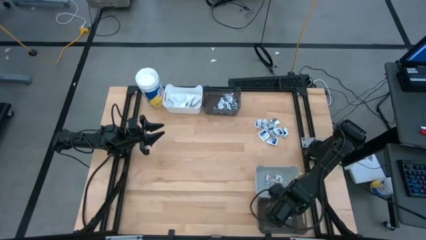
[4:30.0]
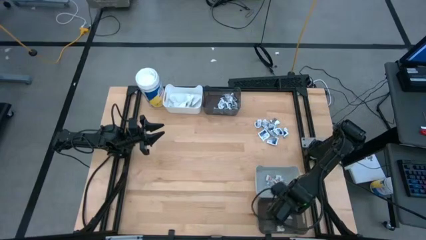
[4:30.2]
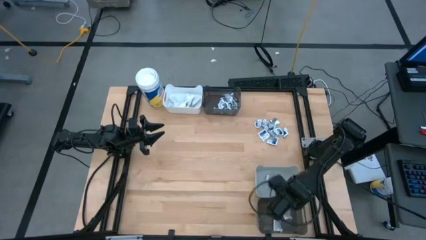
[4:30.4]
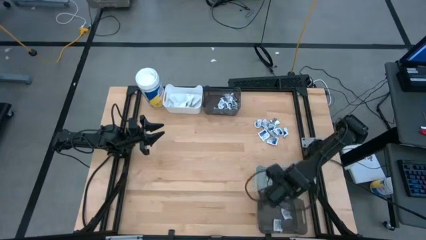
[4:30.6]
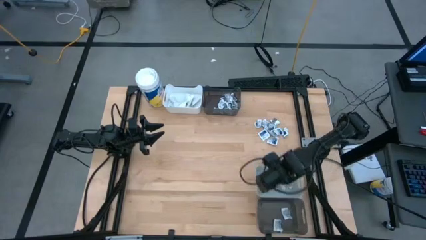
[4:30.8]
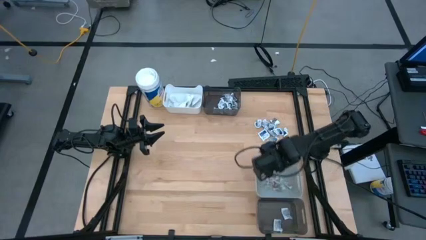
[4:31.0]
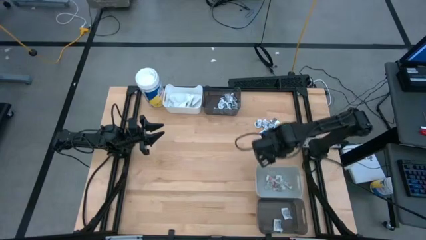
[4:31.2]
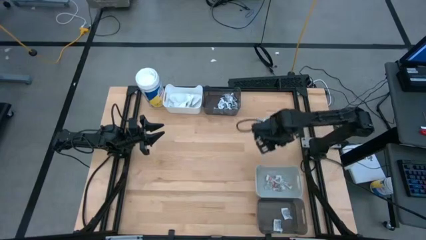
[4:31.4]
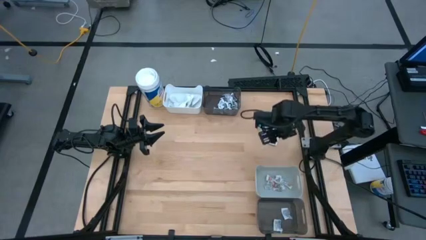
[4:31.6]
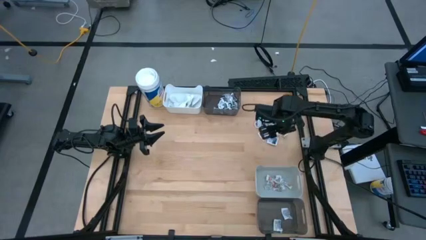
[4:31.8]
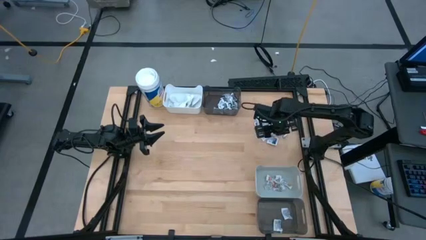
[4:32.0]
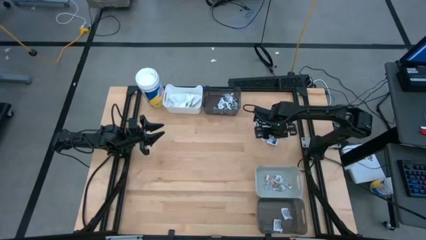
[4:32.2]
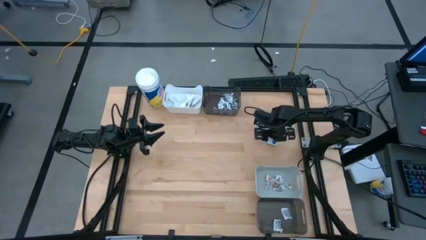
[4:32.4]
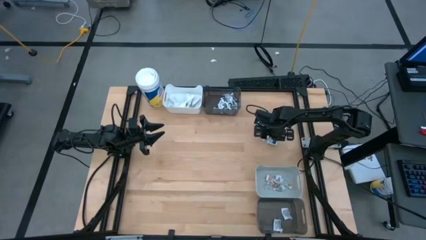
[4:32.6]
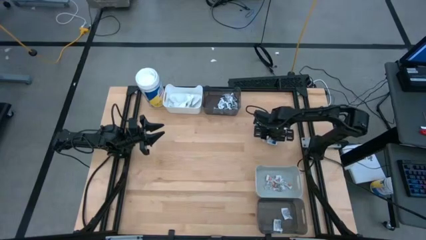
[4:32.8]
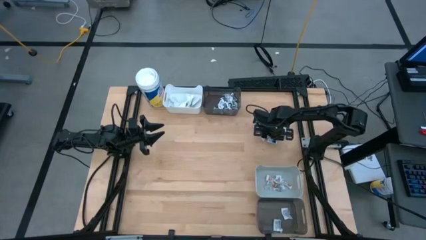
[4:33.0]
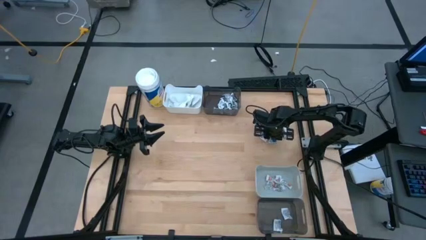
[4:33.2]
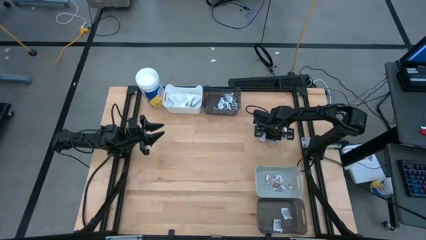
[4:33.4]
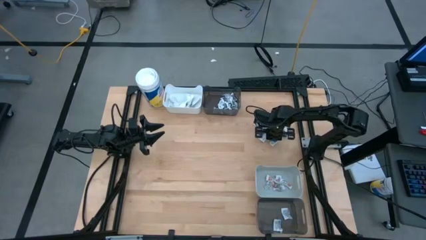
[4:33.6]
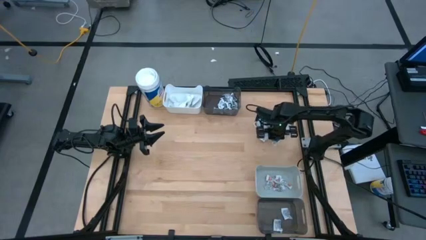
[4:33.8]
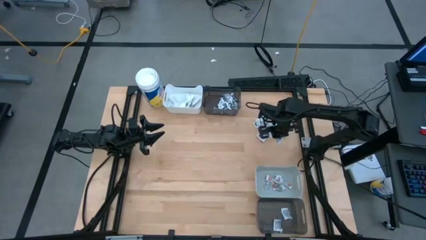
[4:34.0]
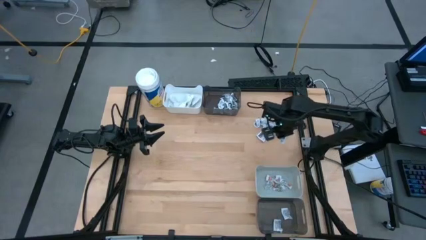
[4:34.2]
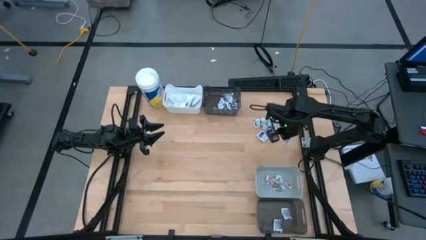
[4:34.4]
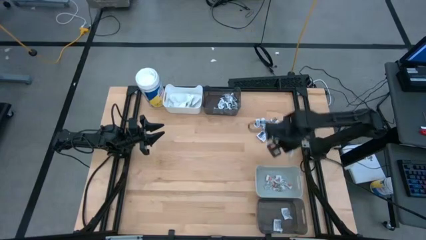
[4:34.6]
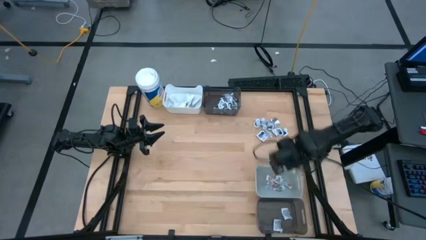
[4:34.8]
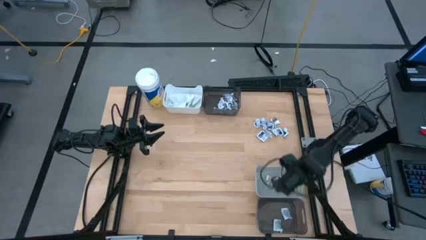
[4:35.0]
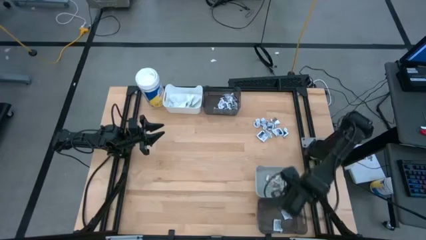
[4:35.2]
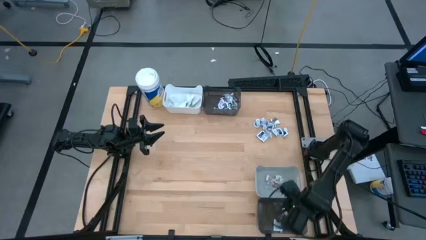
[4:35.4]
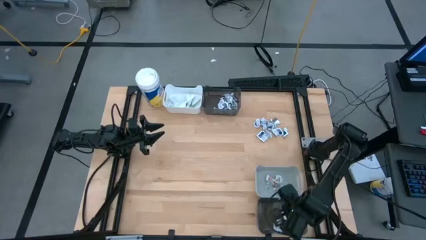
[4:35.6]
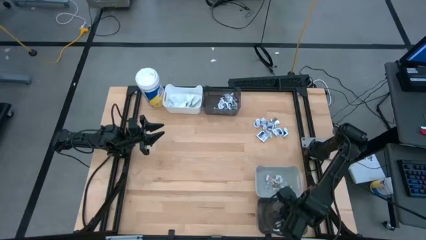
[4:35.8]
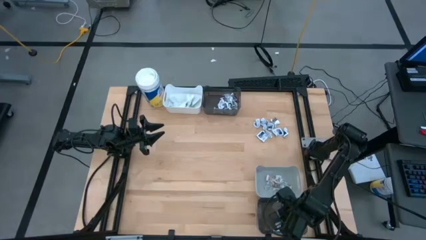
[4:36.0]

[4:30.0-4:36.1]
Task: Pick & Place First Aid Supplies
Put the blue alcohol pad into the bottom black bin

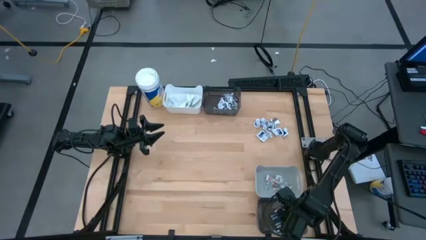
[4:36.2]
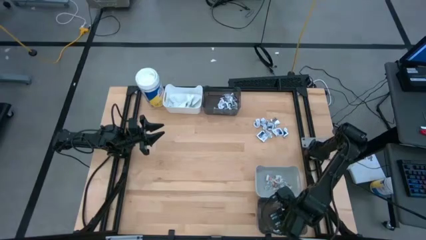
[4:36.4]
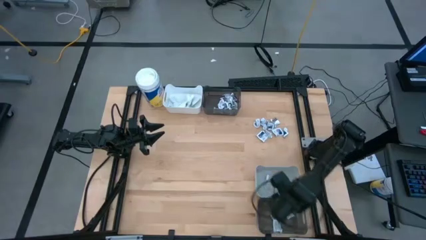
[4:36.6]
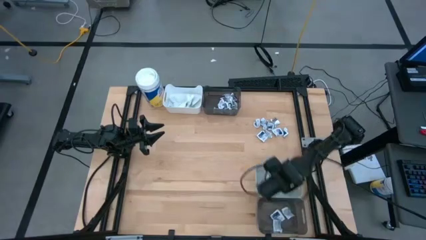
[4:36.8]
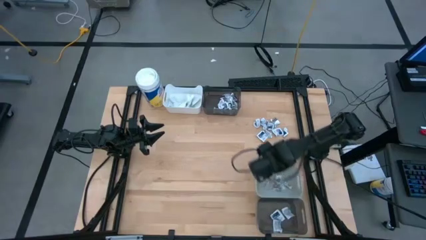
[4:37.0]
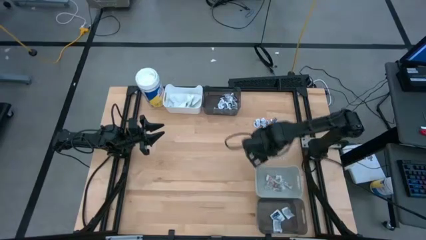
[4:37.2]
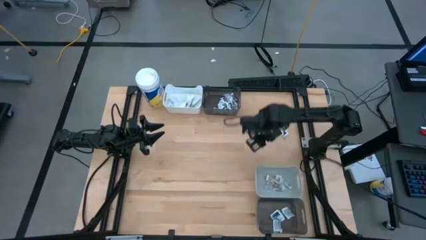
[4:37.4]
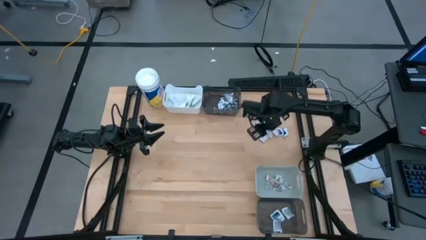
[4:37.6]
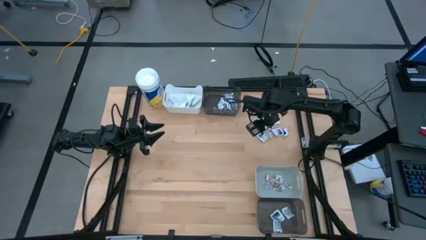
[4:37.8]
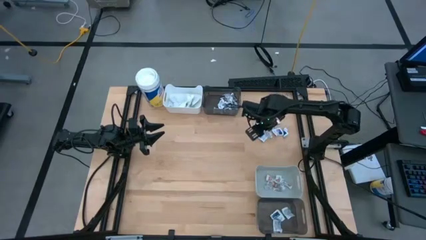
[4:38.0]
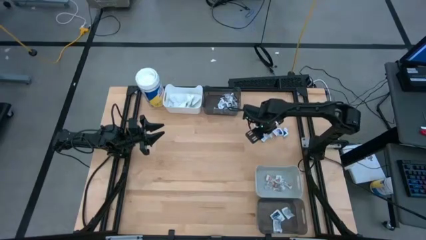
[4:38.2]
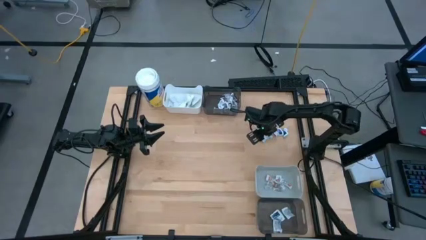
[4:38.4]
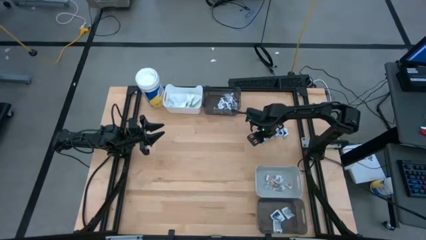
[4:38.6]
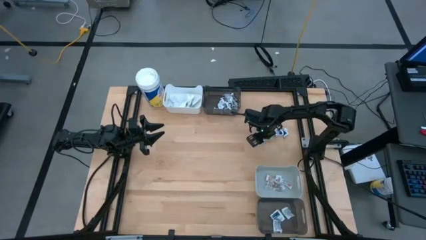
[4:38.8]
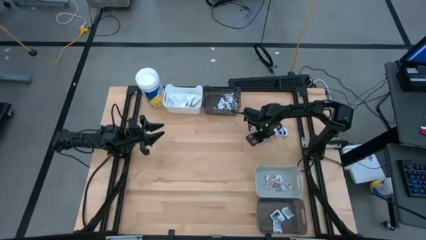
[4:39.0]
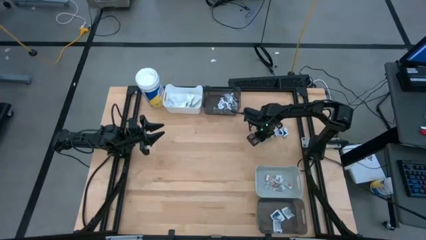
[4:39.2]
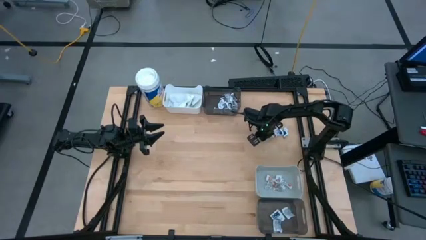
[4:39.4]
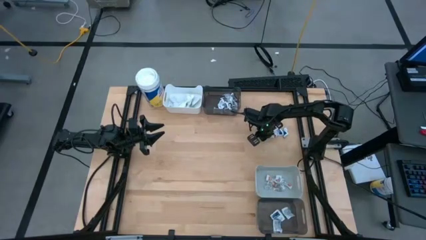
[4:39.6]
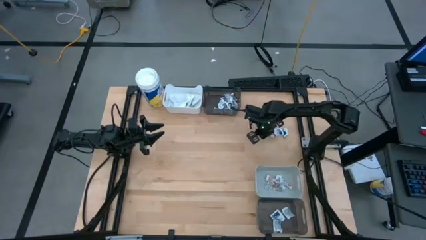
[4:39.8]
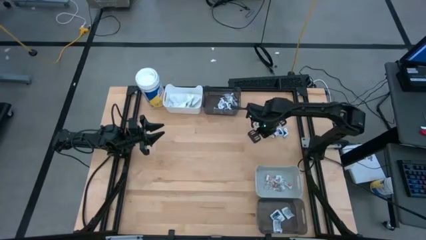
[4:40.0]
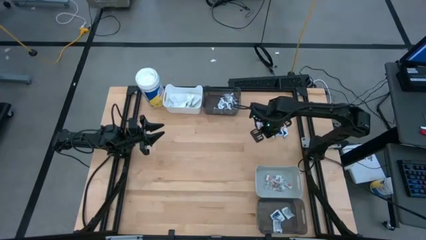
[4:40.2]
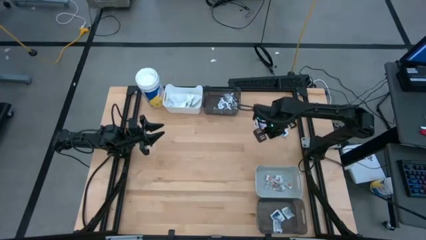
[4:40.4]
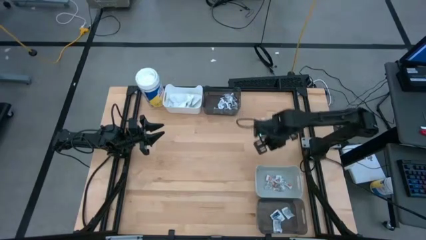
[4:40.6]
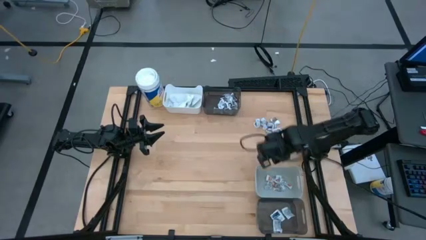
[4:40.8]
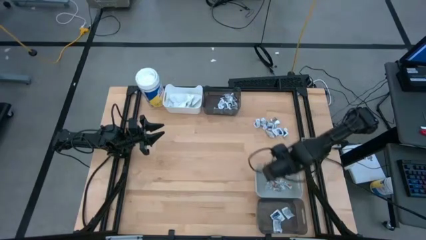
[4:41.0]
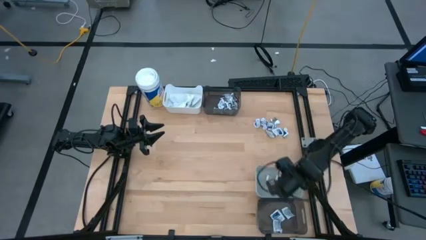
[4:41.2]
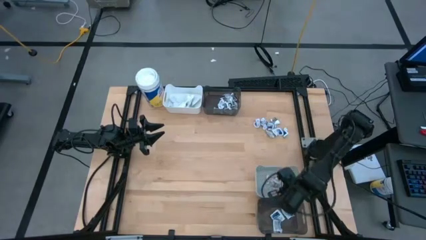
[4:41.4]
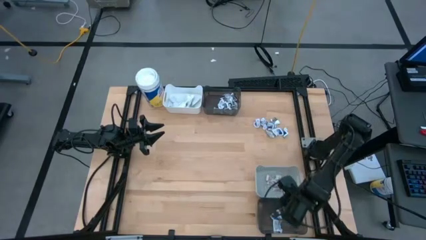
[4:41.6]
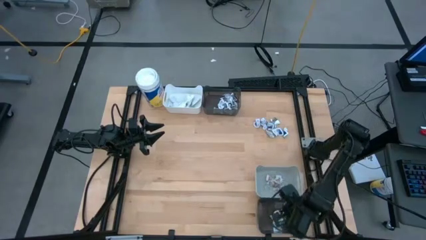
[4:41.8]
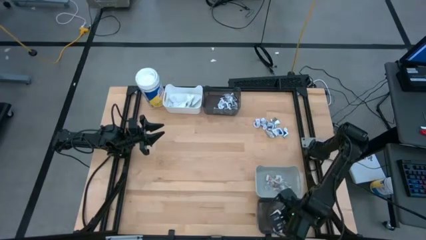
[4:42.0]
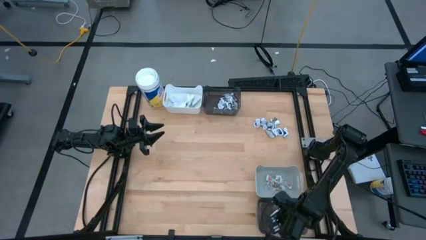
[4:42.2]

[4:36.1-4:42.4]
Put the blue alcohol pad into the bottom black bin

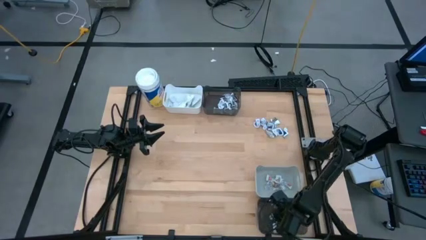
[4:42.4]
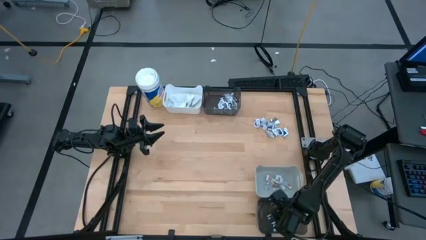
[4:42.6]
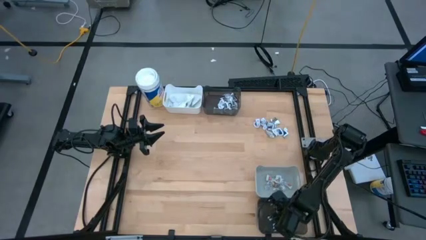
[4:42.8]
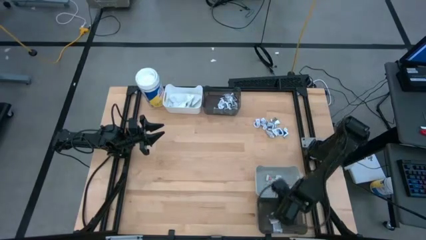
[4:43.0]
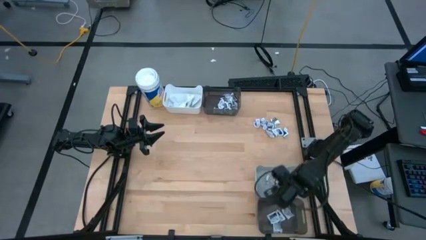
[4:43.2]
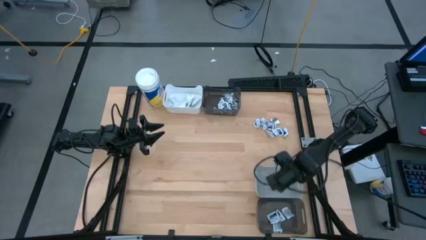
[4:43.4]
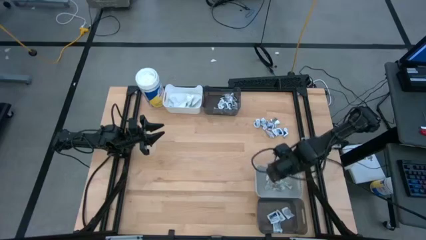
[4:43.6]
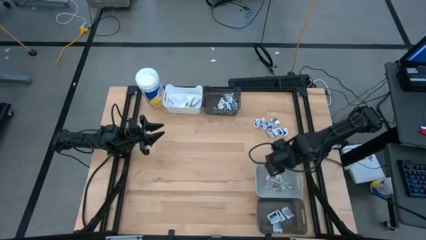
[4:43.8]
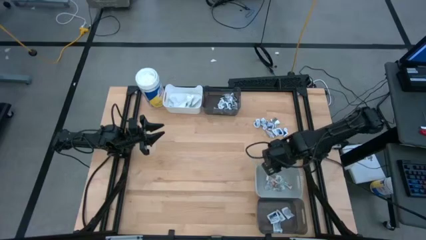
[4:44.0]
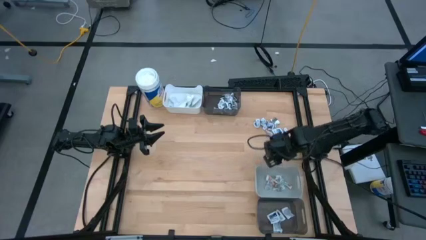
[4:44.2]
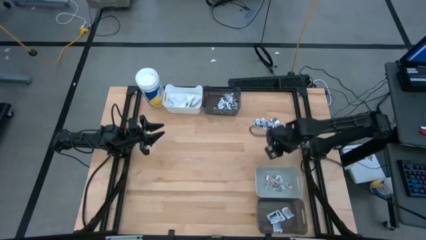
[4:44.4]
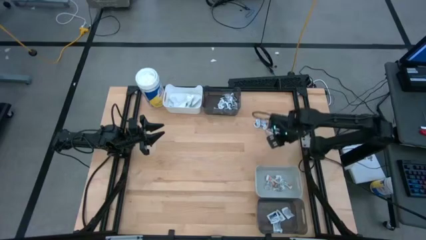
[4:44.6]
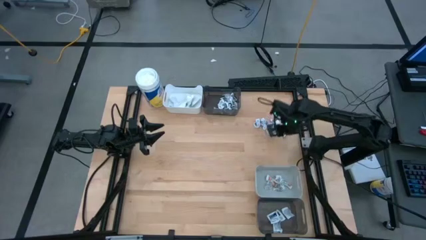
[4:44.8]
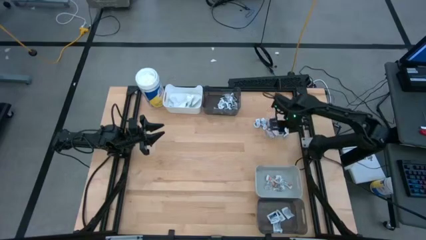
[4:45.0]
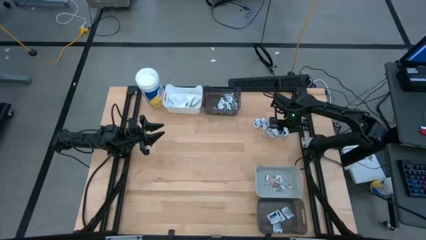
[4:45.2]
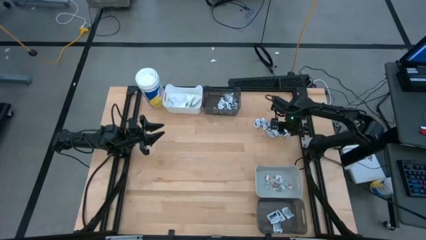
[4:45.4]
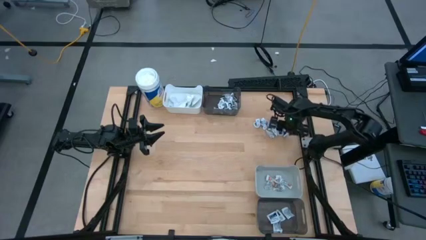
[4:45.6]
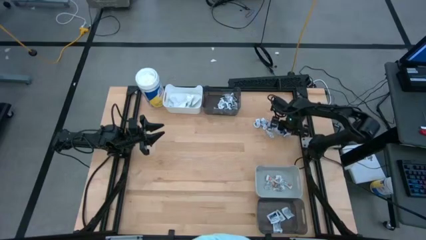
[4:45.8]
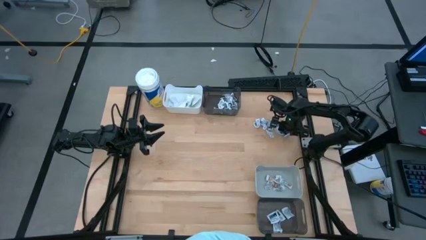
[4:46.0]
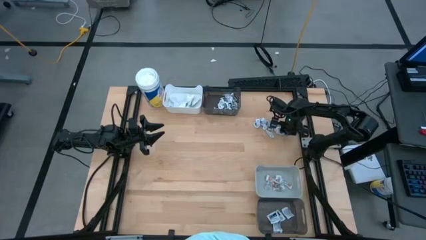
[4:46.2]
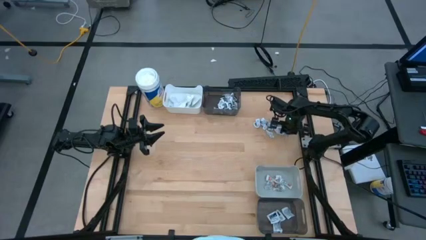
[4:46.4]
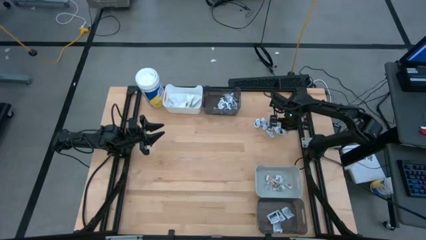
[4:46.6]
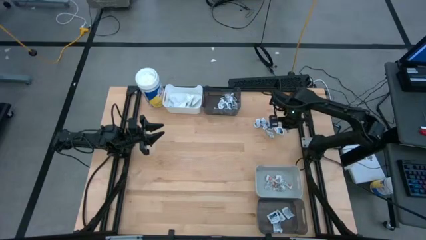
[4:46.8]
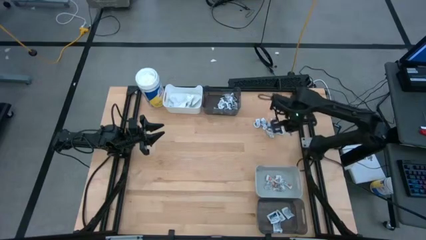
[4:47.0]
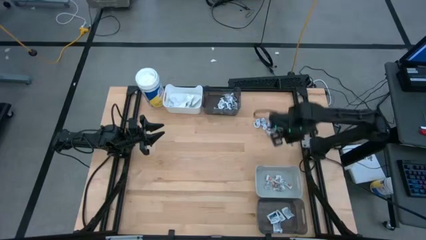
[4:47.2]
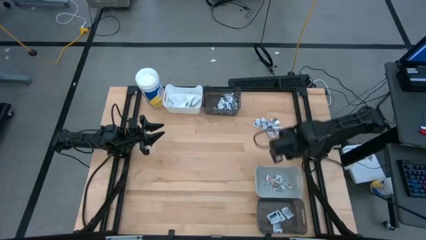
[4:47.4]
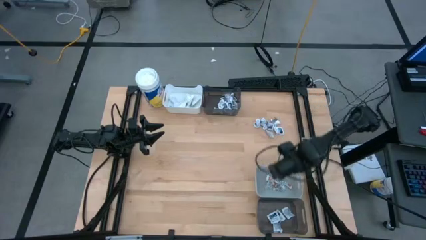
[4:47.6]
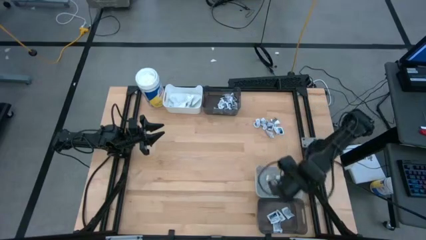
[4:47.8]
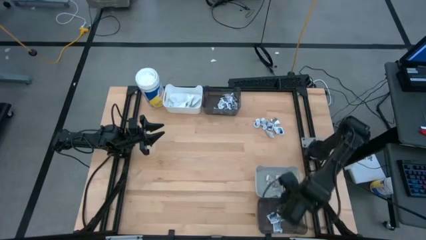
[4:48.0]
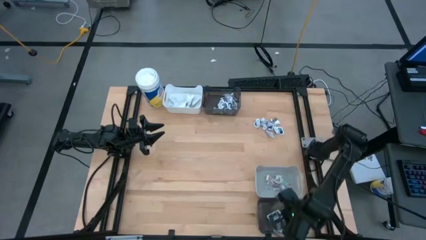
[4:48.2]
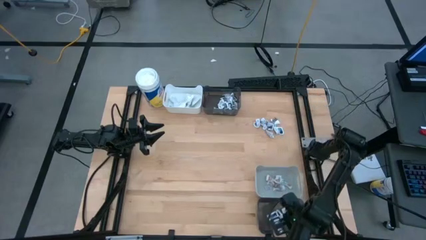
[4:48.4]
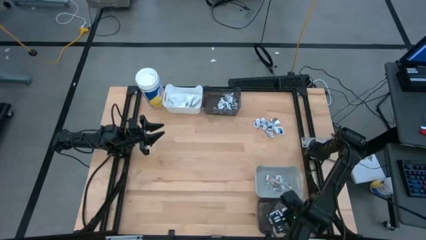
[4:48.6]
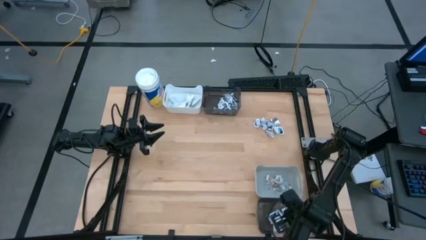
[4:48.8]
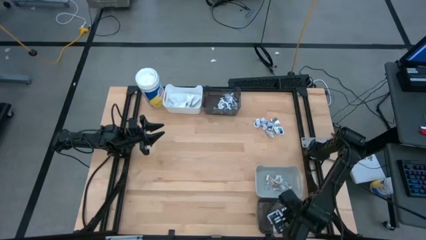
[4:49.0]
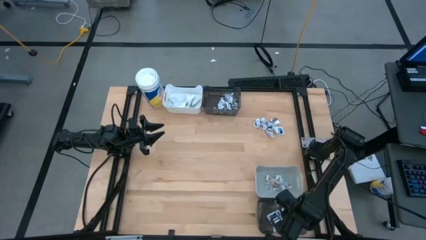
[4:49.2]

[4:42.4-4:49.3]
Put the blue alcohol pad into the bottom black bin
